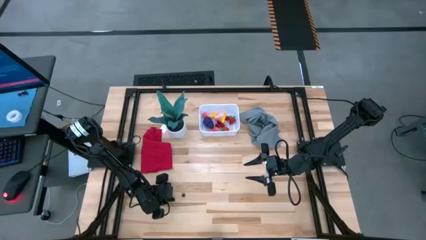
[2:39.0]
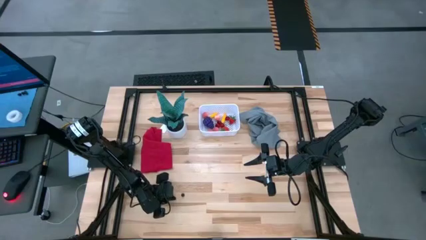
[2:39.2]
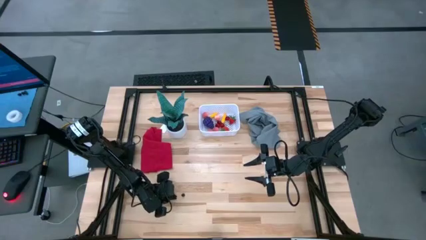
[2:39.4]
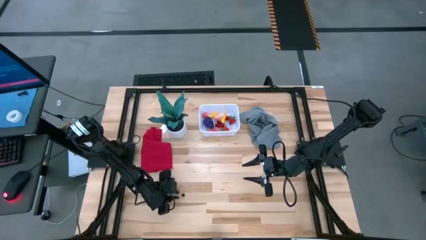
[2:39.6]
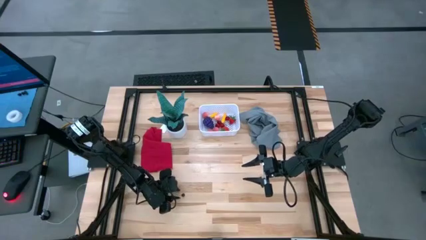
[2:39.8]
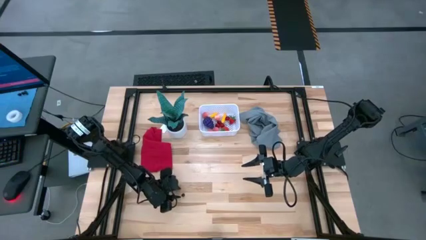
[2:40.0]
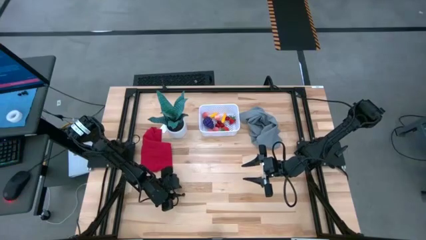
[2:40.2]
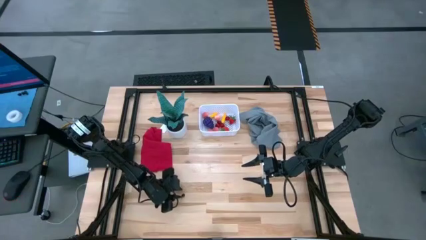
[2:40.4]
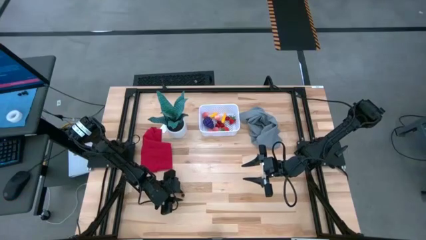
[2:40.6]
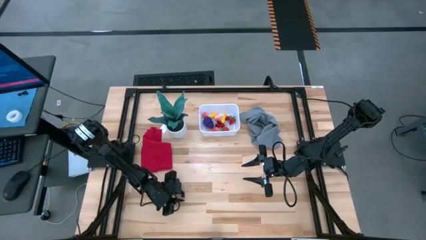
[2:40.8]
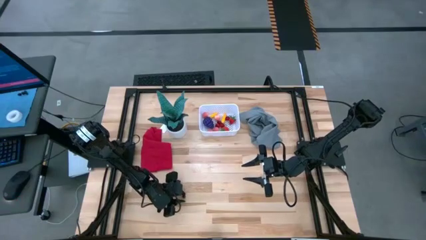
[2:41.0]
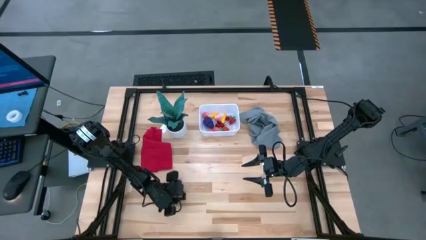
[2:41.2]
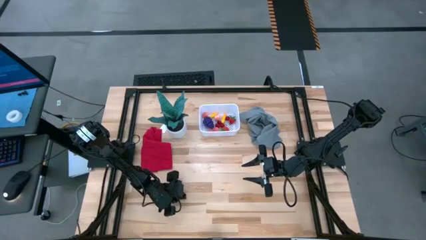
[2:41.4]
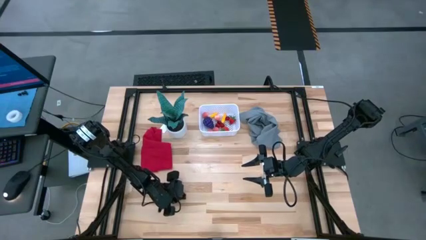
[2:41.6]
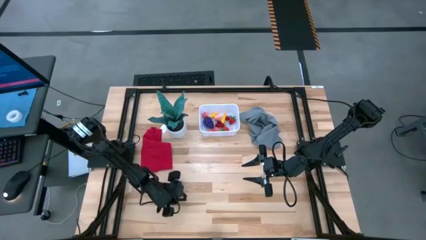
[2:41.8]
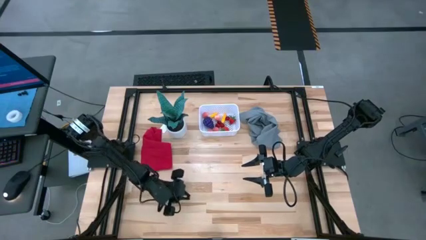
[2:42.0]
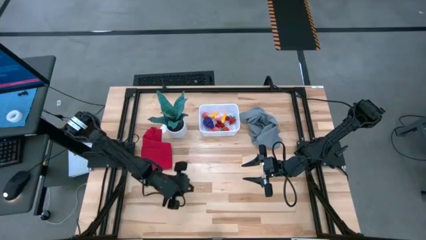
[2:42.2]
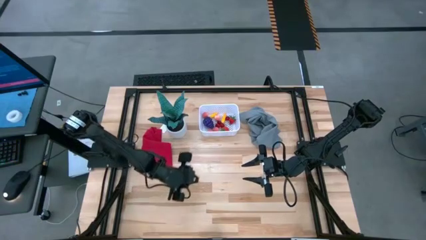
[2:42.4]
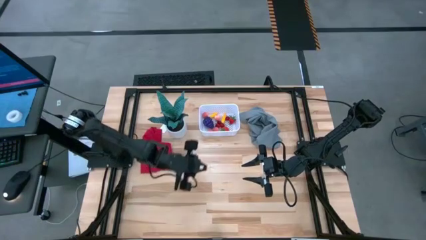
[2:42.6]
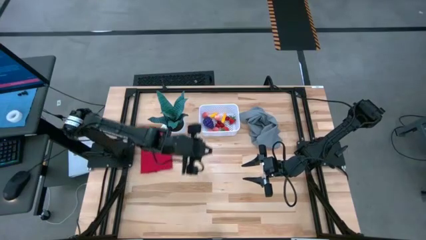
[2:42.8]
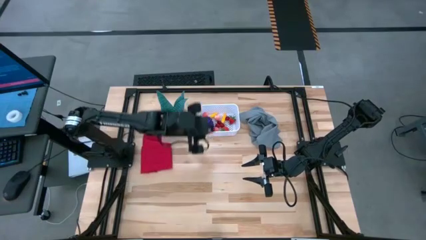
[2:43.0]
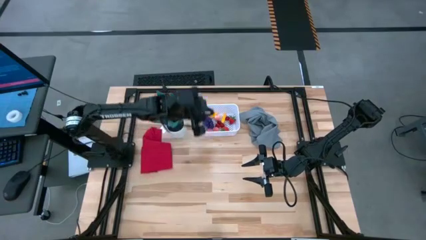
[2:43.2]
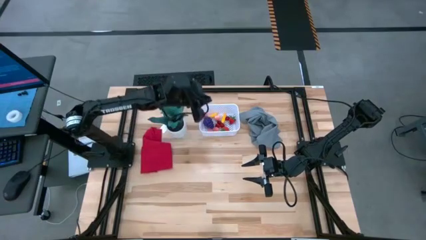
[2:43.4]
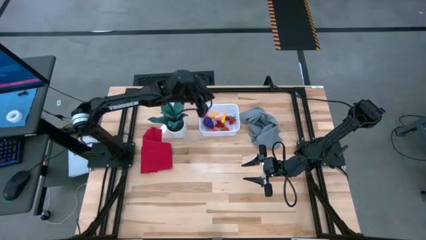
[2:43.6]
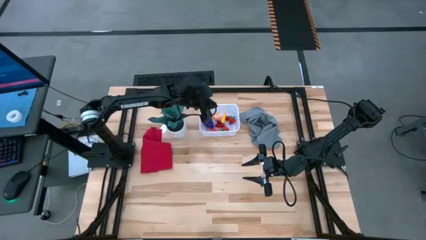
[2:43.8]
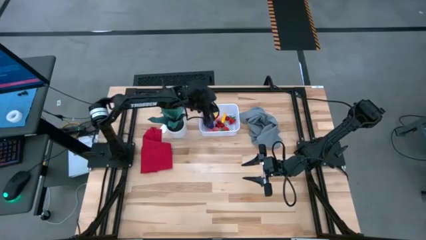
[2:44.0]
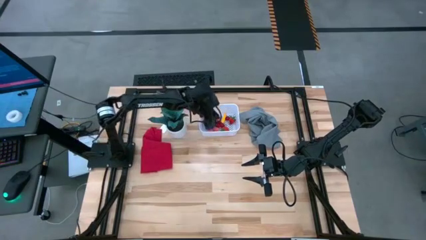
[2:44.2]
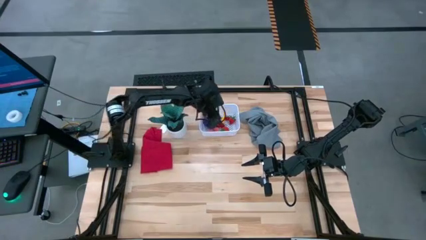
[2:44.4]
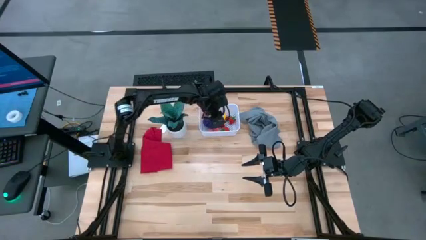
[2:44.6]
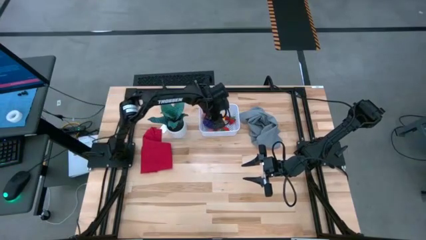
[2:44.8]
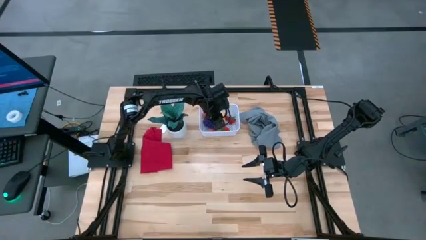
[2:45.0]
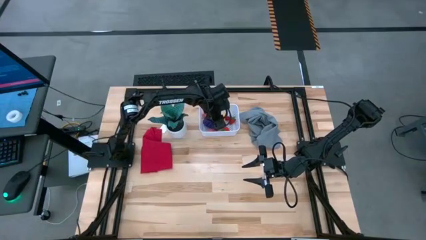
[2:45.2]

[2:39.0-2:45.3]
Task: Pick and placing Produce into tupperware
Put the blueberry into the white bin

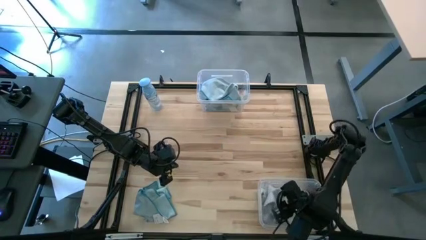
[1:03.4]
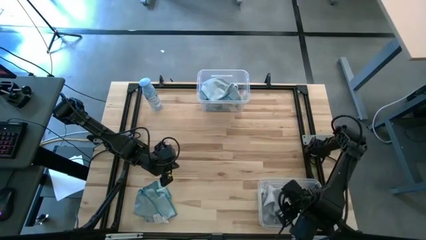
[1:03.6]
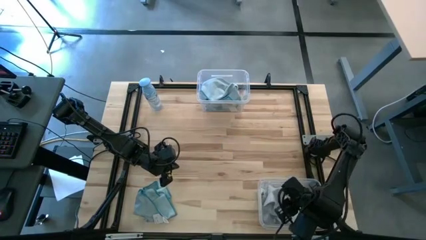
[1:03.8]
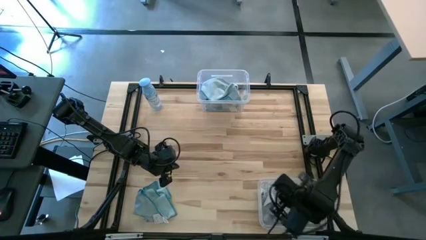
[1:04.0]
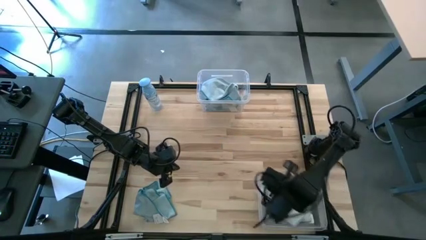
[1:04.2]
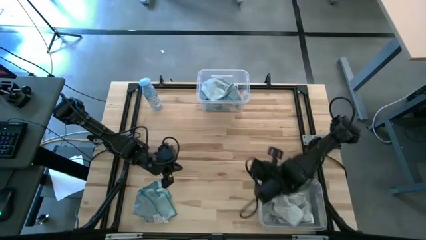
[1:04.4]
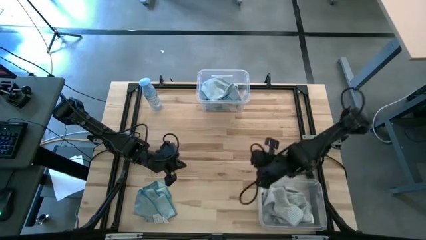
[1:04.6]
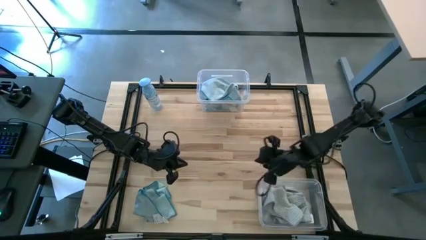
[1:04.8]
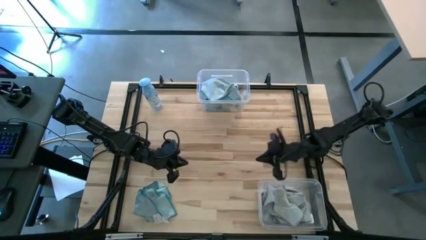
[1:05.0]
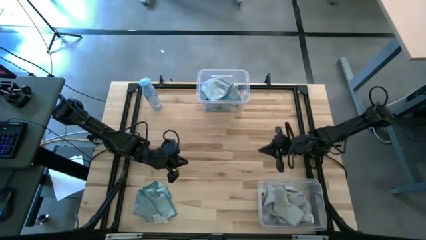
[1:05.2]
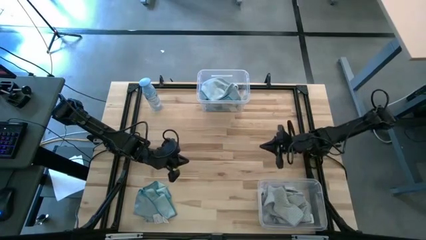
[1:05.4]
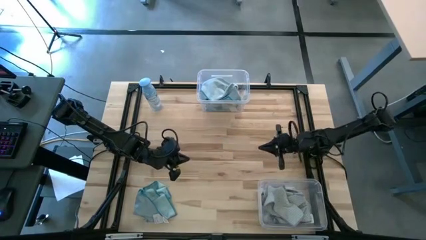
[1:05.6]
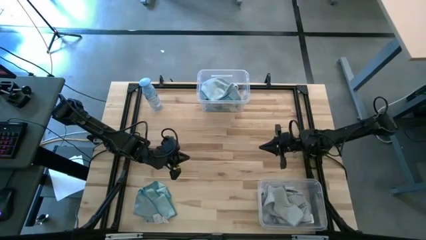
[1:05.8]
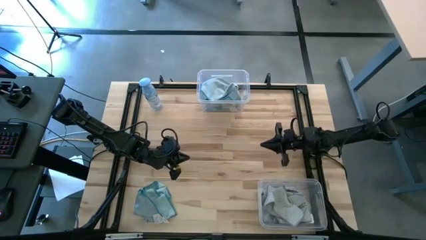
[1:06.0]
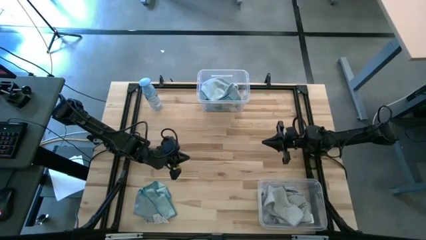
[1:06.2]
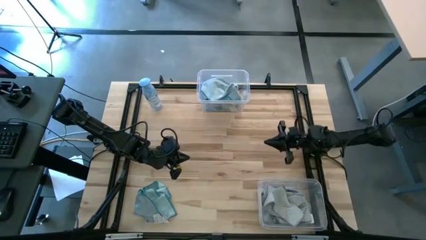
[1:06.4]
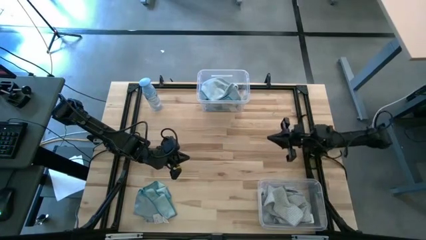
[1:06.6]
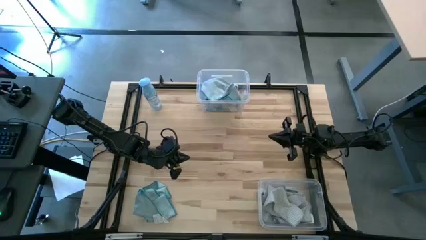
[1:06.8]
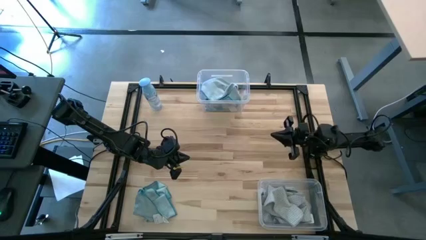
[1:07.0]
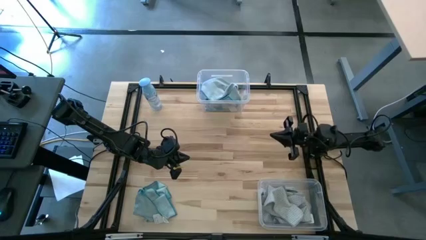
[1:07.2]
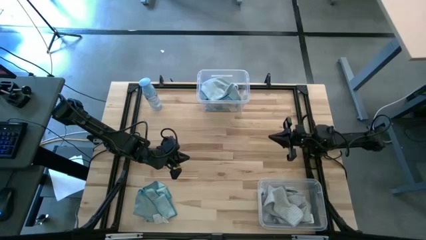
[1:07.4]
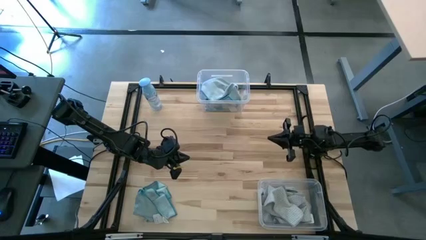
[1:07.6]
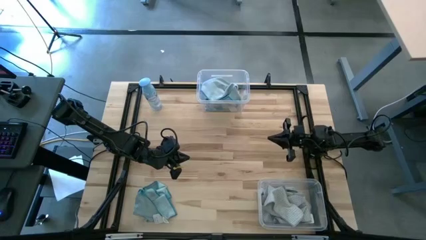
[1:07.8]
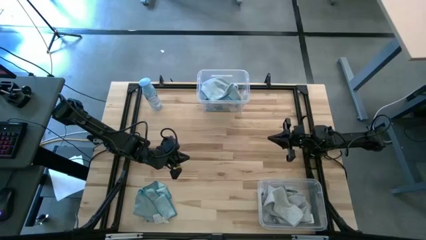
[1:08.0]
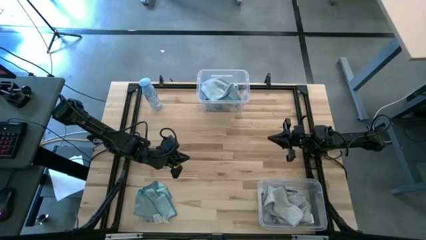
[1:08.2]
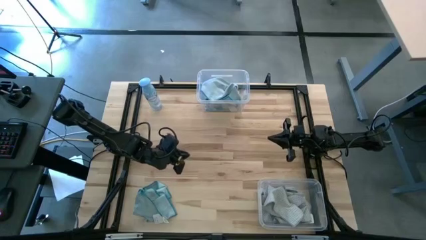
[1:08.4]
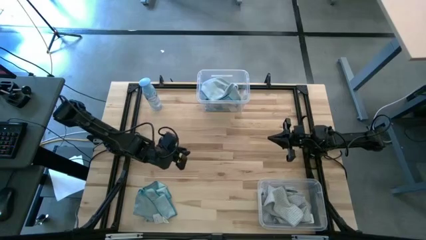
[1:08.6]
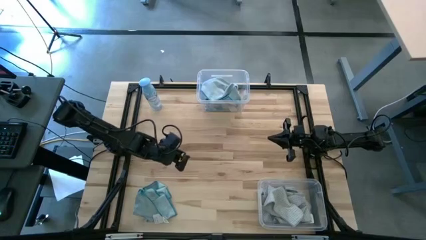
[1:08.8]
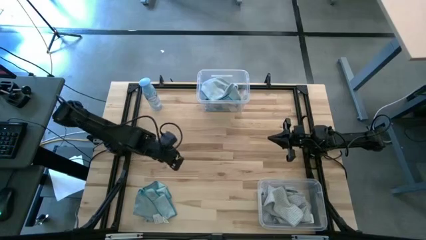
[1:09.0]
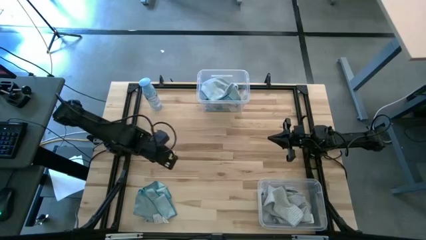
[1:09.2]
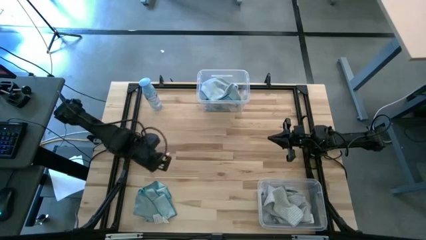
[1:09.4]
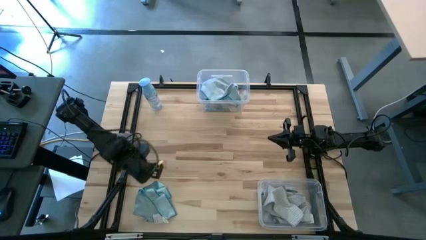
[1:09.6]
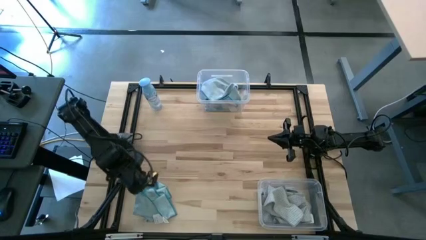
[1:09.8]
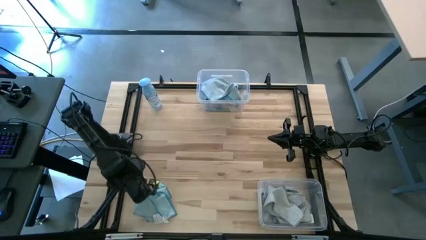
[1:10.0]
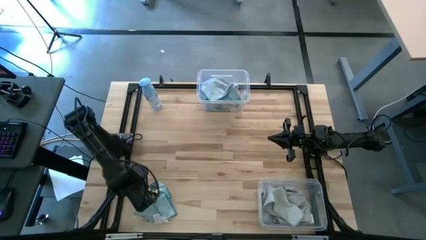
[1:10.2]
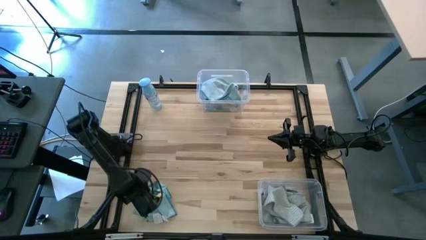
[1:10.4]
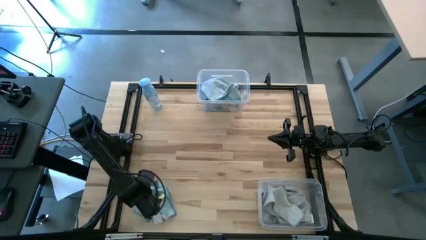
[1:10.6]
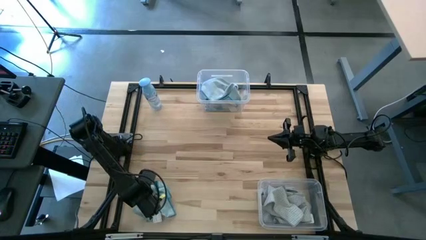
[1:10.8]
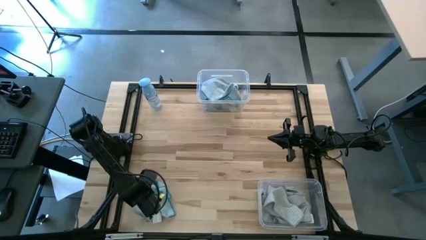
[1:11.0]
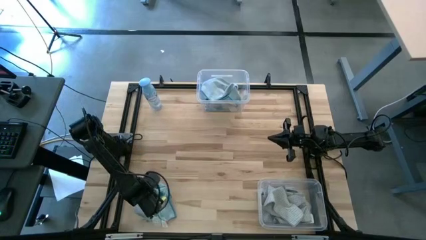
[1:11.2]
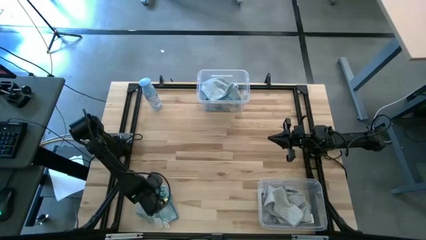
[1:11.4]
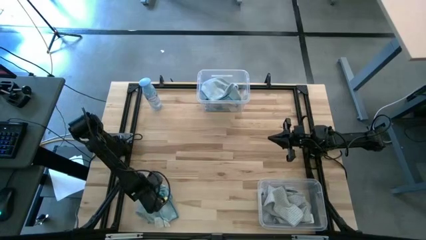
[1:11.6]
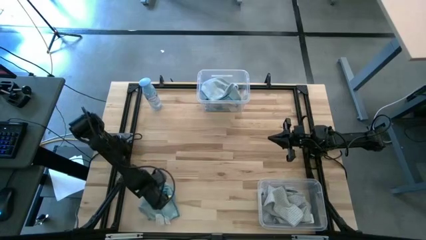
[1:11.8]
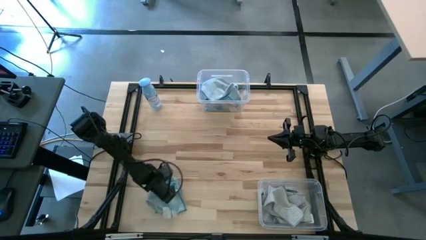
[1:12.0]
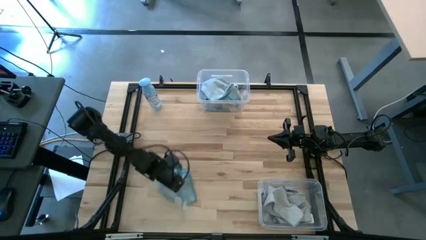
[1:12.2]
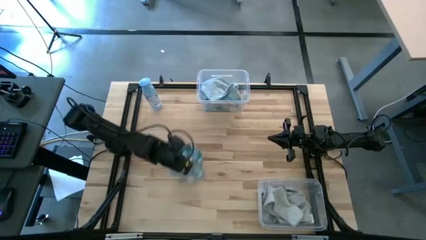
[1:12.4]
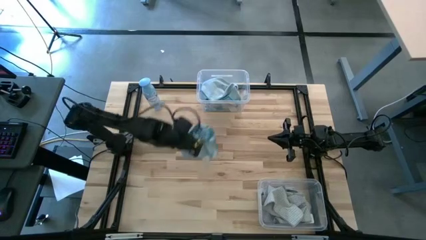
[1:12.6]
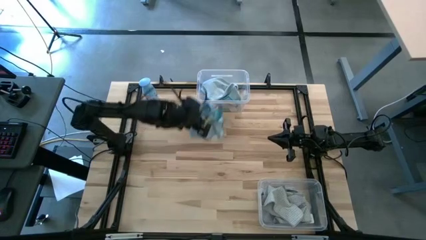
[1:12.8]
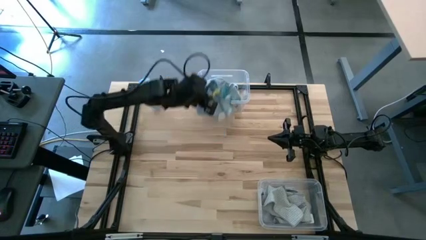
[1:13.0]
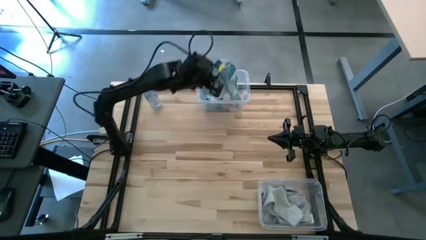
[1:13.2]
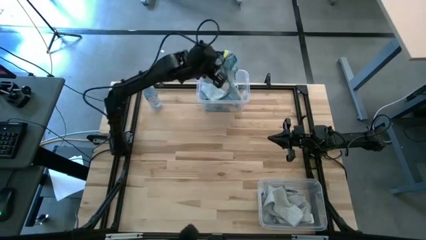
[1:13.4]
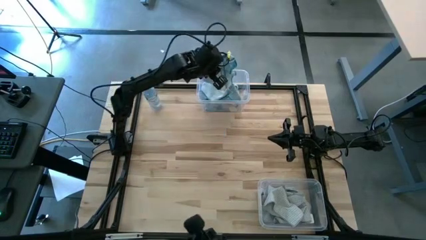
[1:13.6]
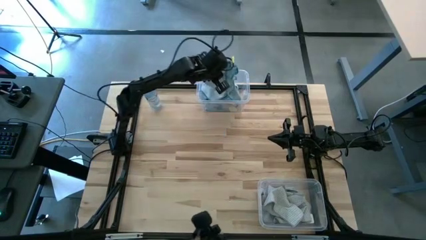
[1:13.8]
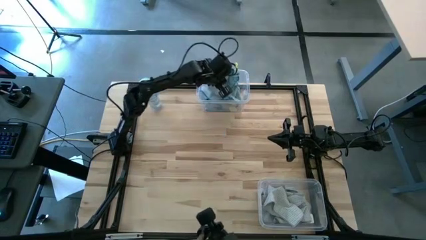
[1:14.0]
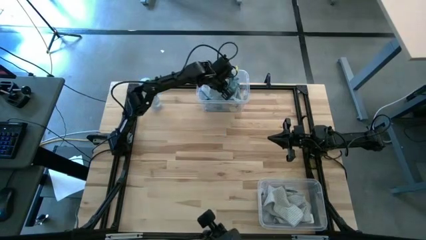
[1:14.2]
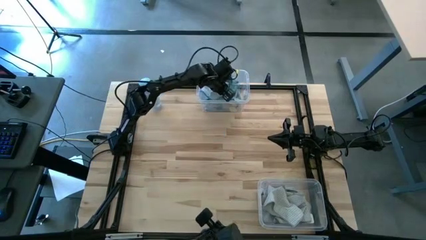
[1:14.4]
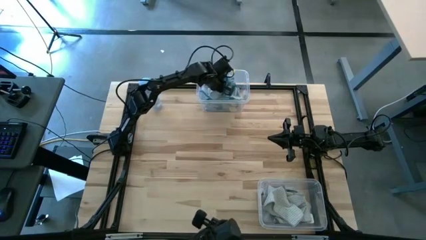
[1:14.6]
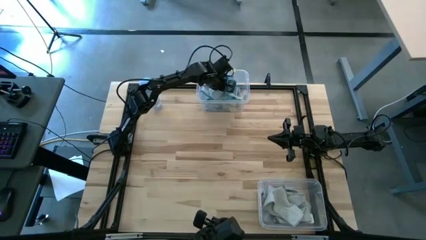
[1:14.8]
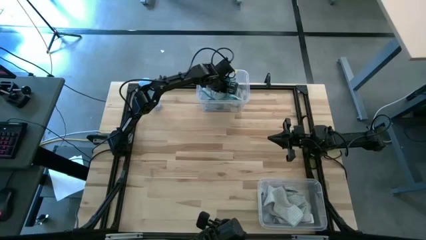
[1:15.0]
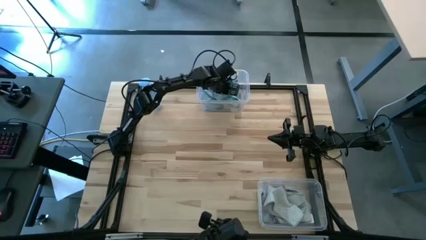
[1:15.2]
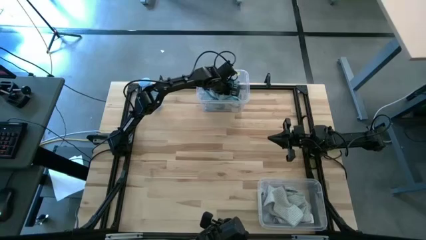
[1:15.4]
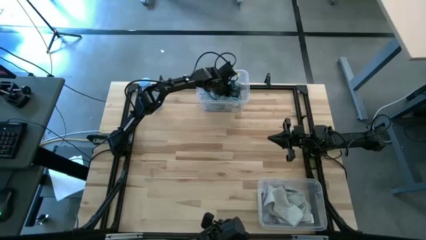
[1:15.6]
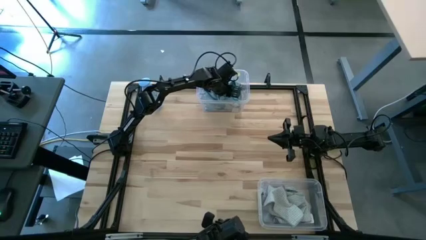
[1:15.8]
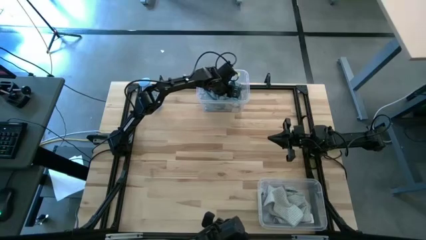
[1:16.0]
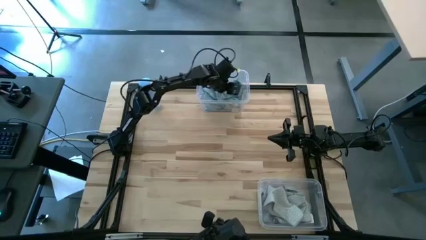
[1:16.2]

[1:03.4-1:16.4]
Task: Sort microfiber towel by color & place in baskets
Put the blue towel into the top transparent bin
